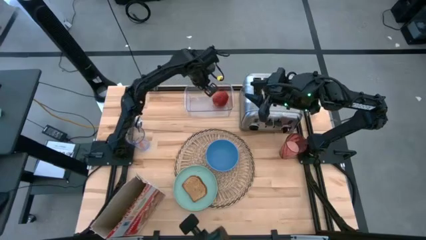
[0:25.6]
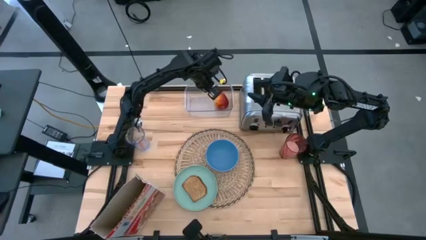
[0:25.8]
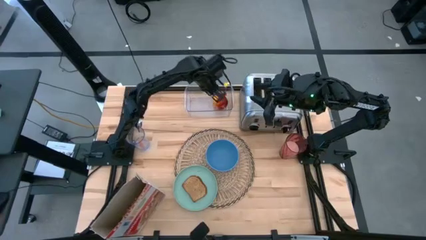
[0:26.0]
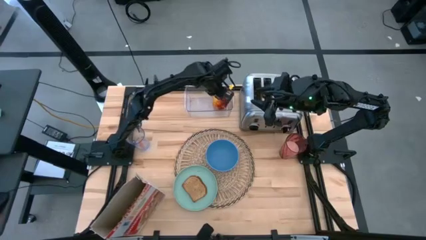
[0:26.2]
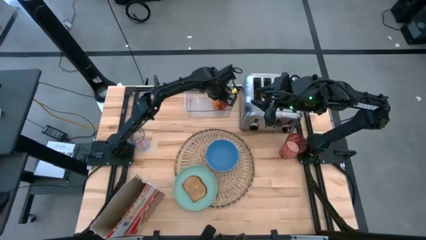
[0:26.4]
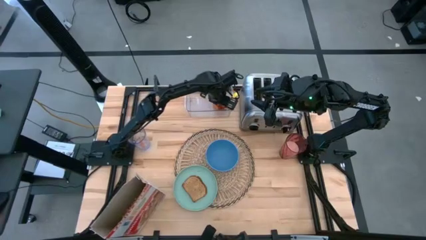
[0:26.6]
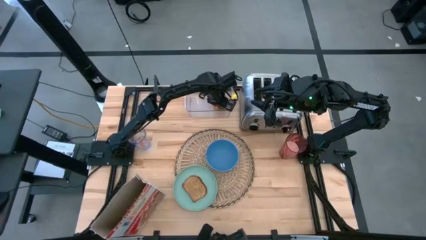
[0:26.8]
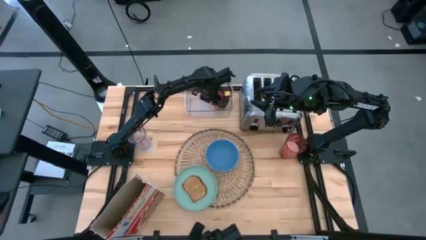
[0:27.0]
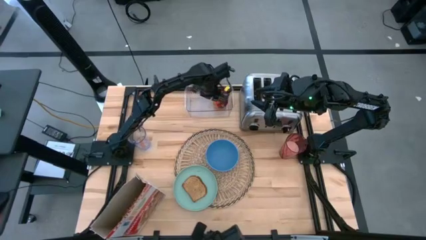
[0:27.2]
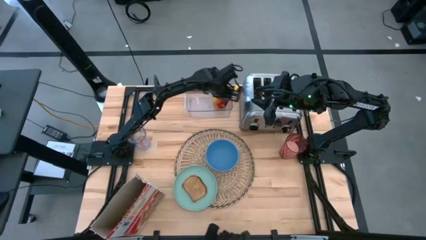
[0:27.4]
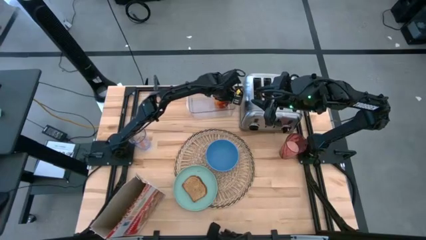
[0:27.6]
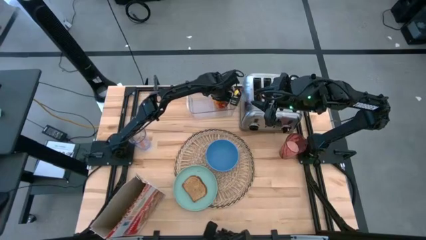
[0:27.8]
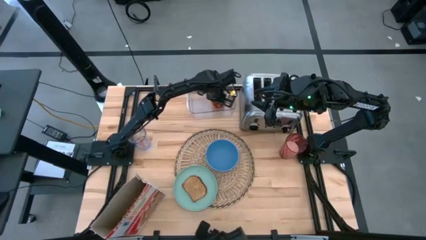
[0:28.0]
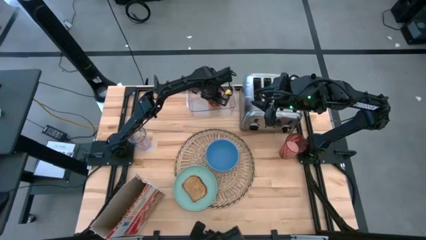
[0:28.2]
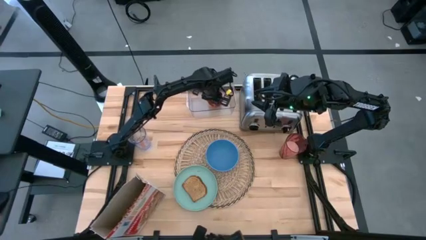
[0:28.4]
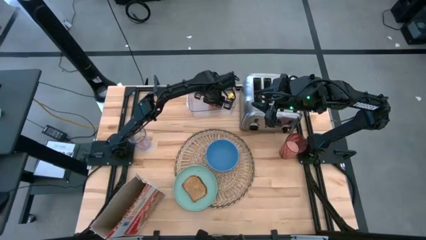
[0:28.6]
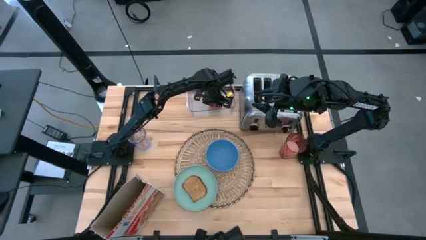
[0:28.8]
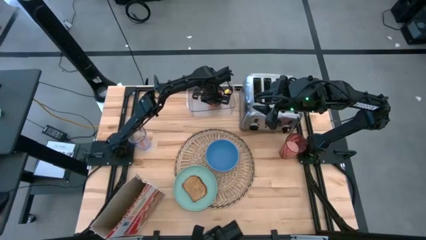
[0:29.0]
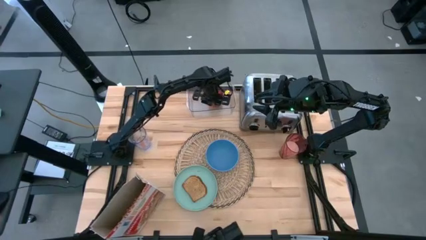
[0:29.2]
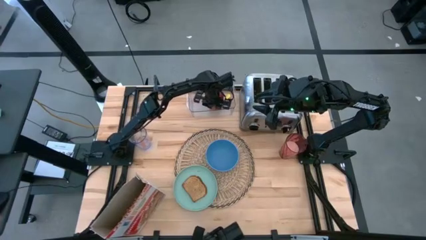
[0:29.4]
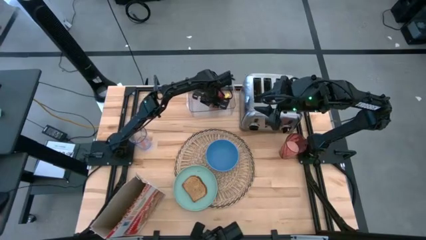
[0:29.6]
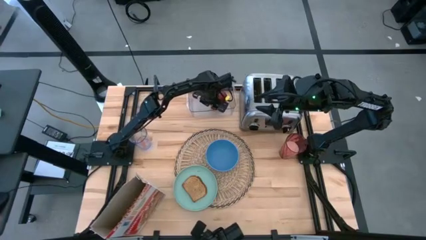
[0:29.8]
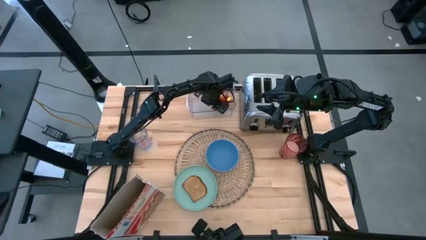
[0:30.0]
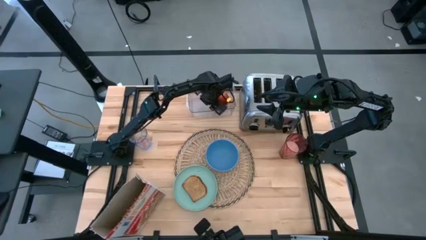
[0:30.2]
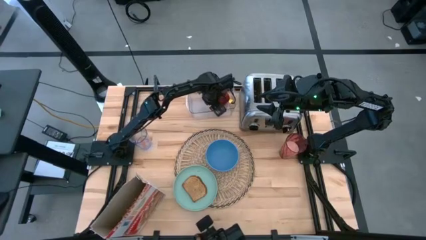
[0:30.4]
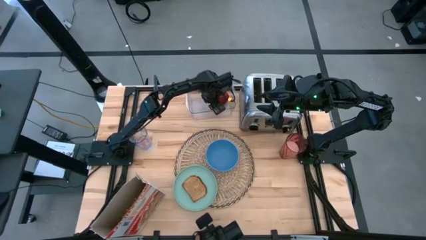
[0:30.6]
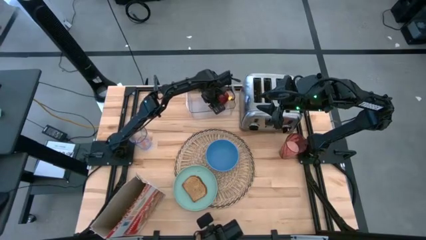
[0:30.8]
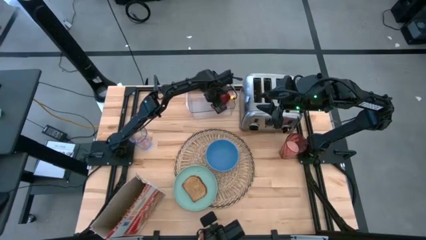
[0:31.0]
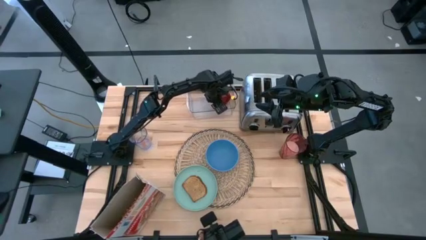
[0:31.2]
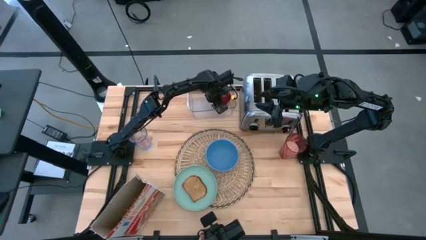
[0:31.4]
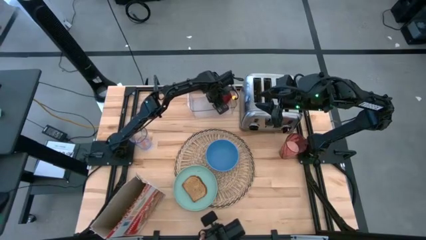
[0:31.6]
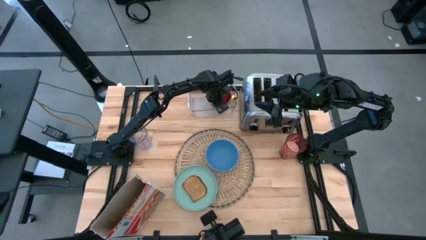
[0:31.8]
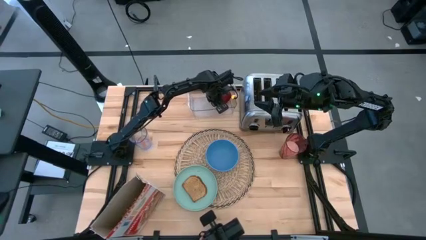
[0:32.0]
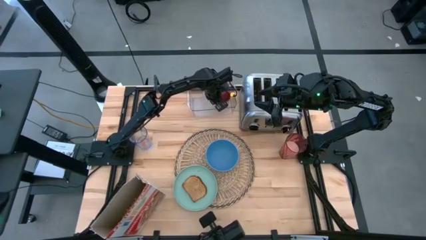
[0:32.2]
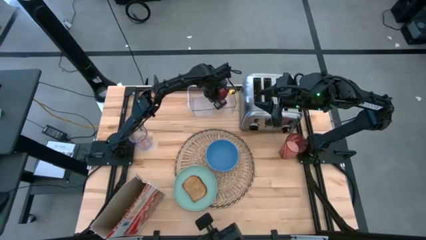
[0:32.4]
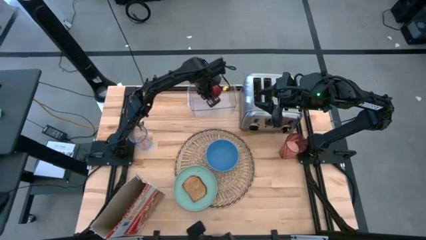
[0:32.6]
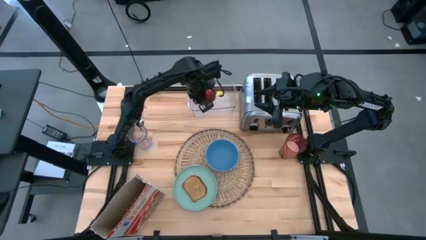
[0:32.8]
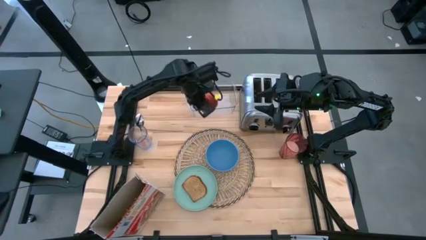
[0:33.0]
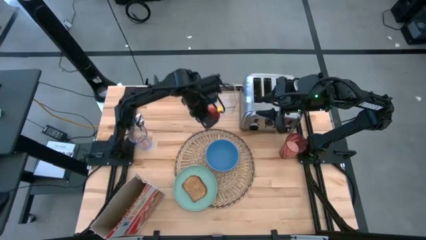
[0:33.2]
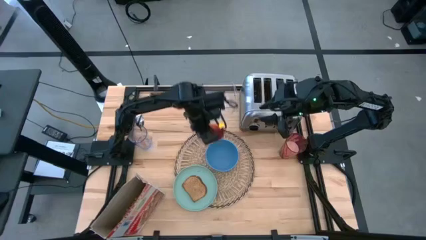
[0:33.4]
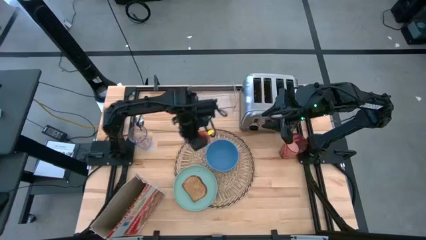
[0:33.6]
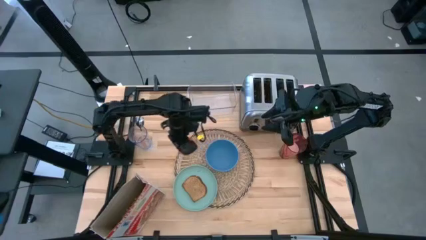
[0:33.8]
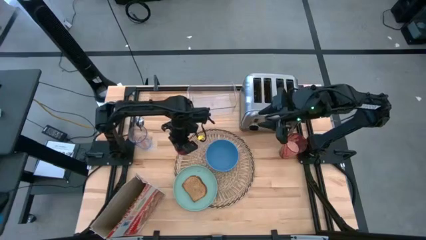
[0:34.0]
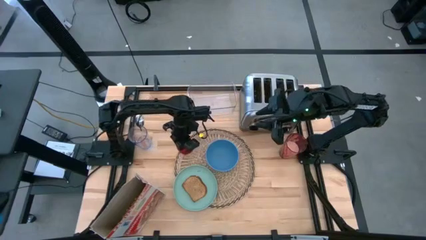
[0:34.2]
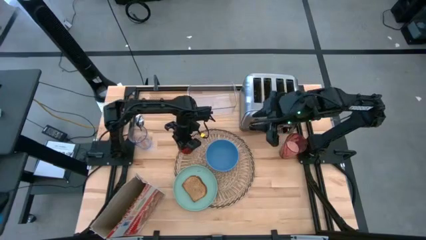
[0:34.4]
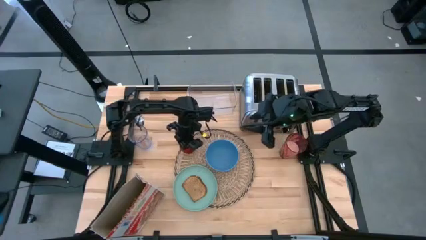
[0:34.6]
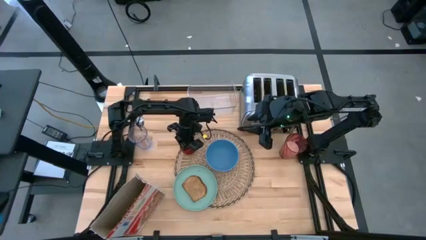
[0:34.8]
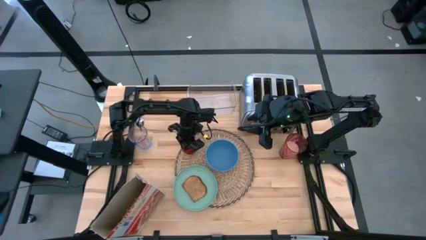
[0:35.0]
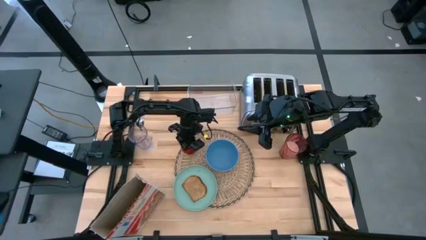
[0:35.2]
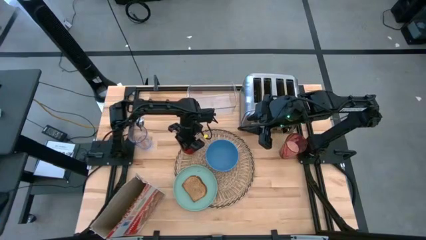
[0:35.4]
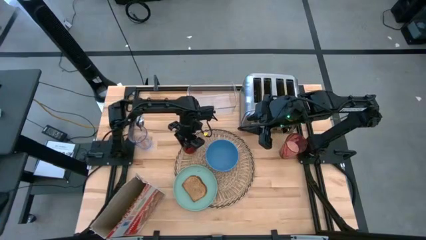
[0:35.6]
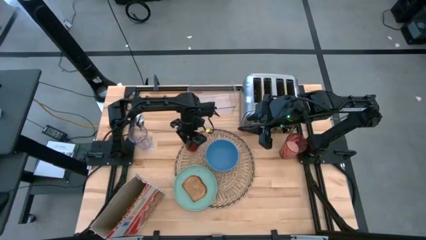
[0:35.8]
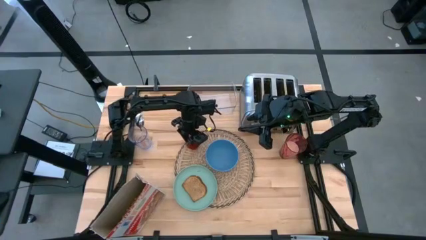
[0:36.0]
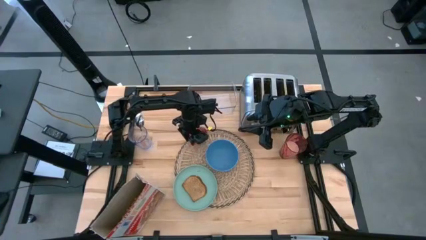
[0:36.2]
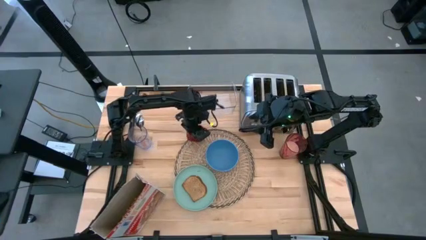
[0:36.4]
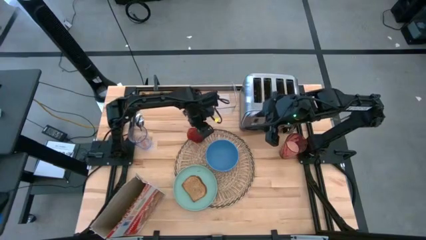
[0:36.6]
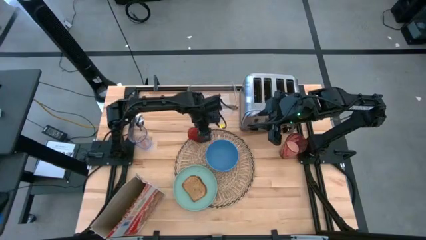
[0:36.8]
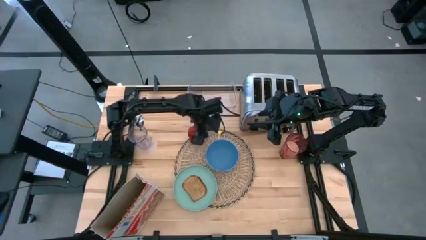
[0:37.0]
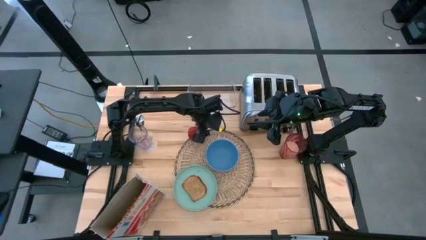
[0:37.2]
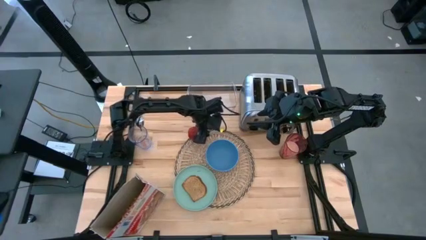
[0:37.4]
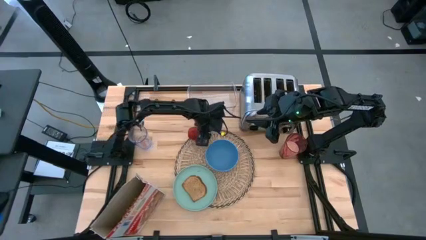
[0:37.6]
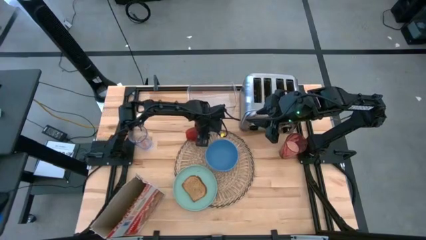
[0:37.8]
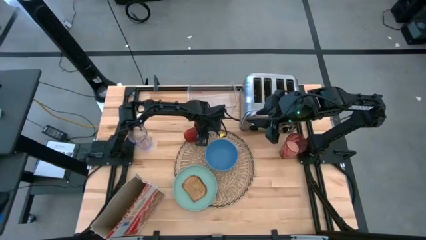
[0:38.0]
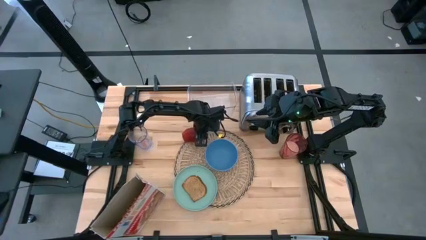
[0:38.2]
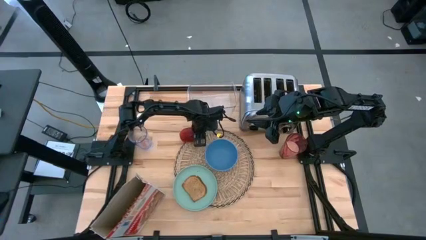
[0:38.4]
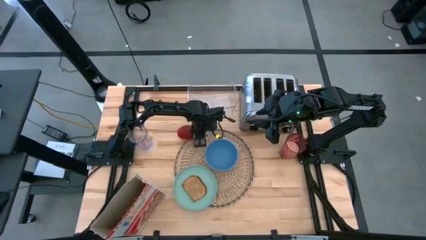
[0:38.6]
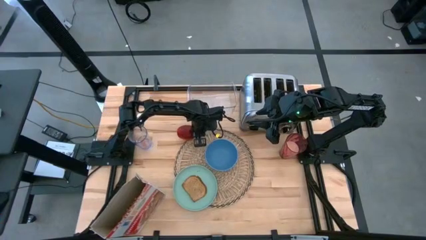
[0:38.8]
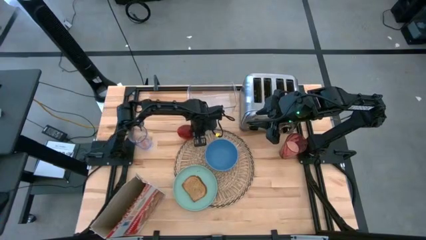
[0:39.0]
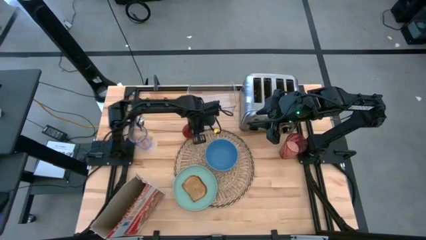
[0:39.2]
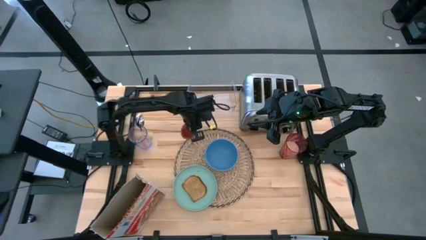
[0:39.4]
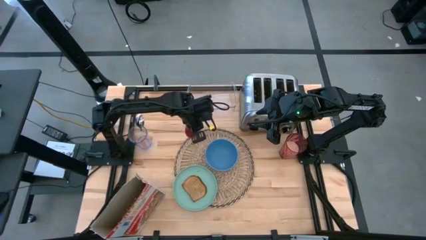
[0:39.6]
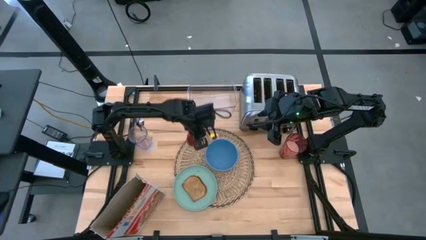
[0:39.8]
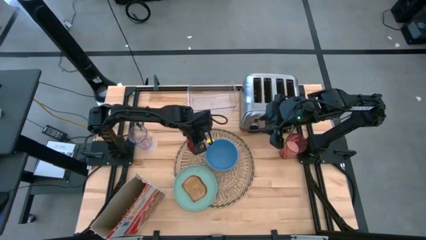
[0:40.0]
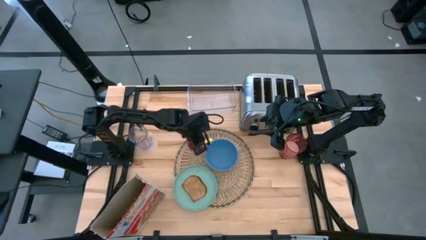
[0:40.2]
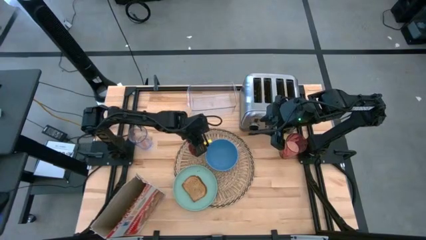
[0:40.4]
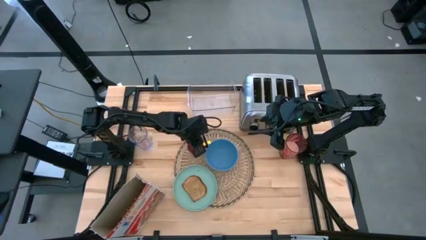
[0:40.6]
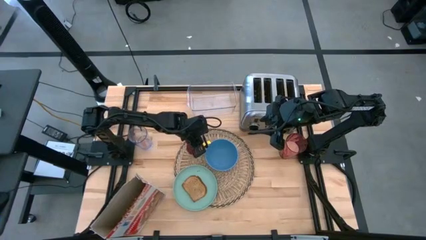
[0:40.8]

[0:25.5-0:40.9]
Task: Arrange a breakfast setting
Put the apple on the brown table mat to the left of the blue bowl

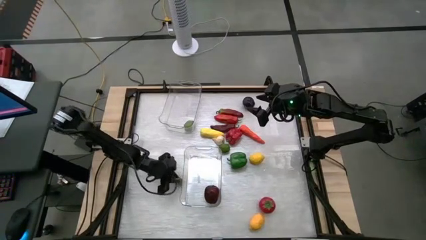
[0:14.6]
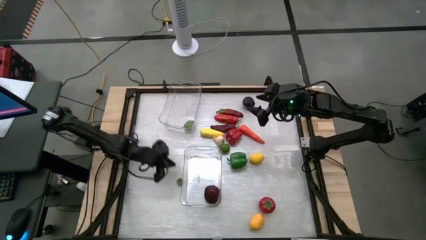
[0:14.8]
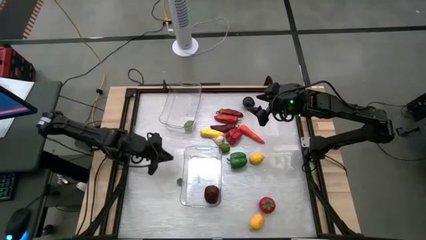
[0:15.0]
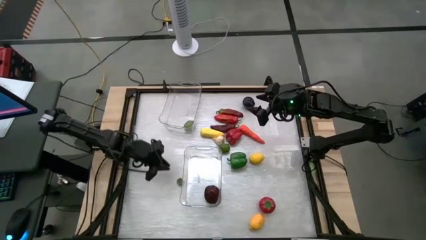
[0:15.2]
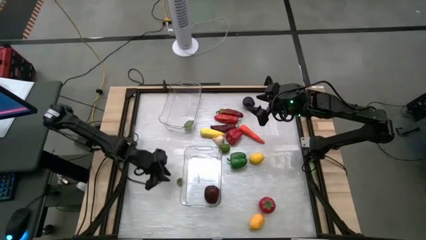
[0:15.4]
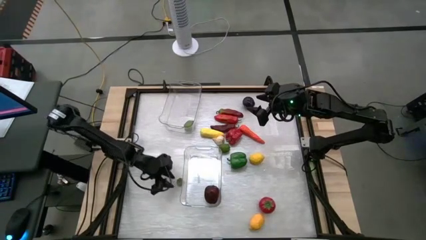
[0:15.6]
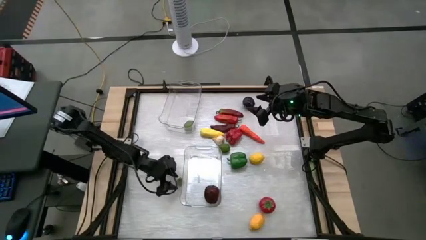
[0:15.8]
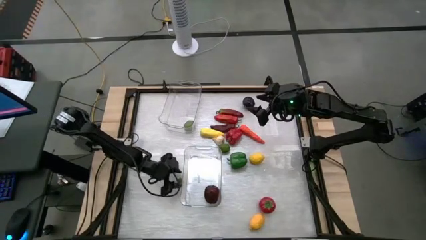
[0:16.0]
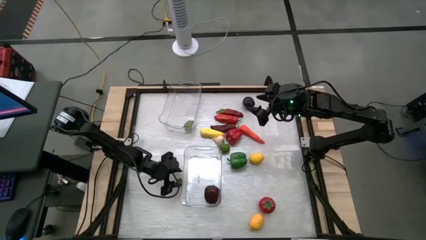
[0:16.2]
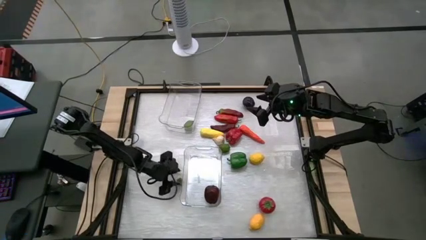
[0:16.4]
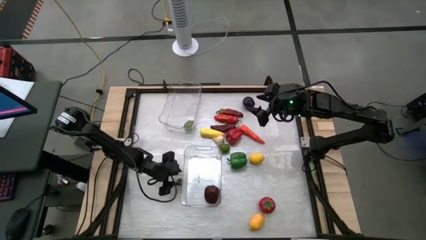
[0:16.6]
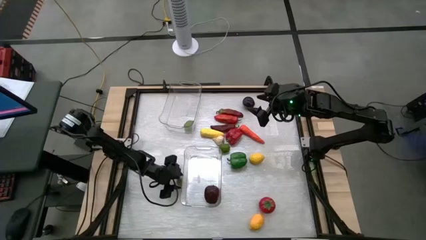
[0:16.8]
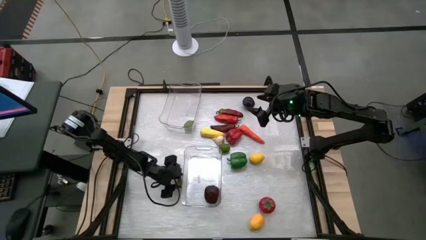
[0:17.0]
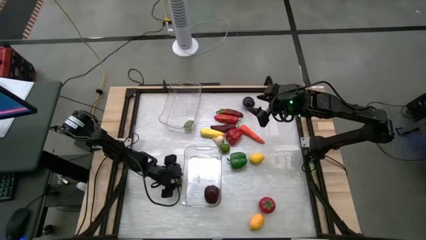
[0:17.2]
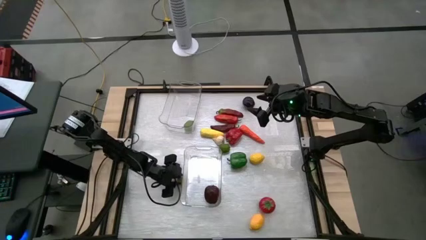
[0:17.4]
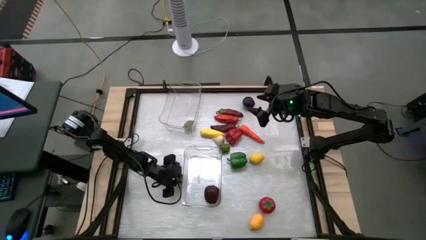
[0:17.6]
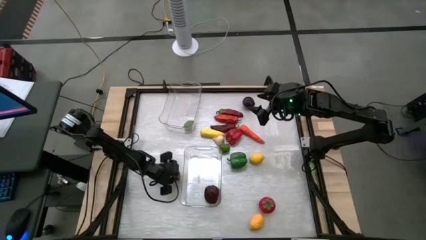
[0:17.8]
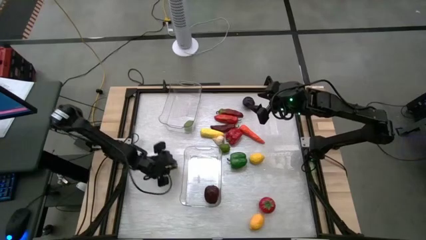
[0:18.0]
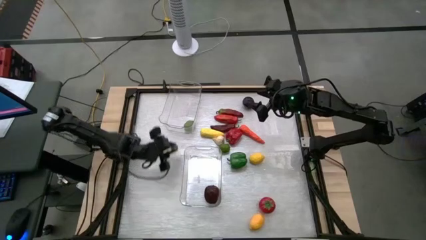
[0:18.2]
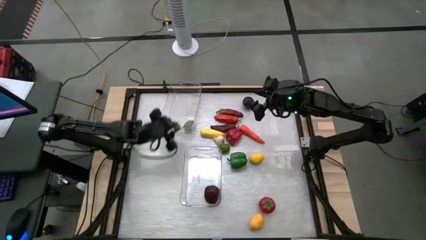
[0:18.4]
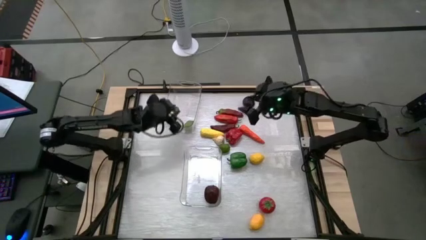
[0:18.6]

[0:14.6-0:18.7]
Task: Sort produce into baskets
Put the red strawberry into the top transparent bin
